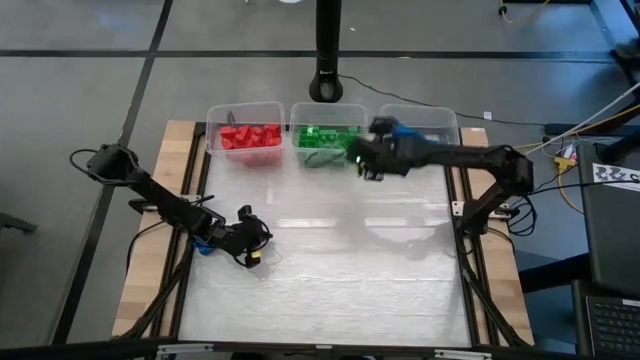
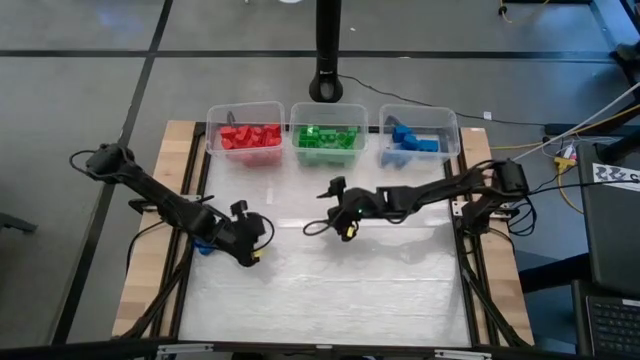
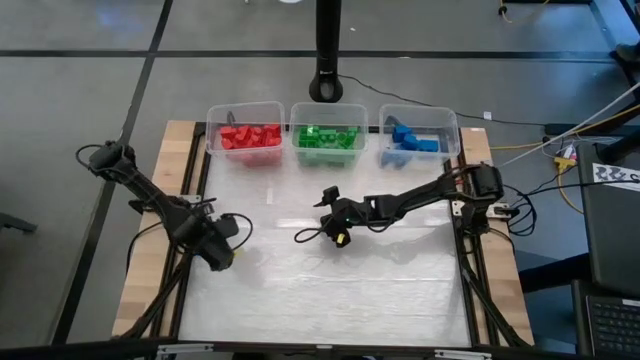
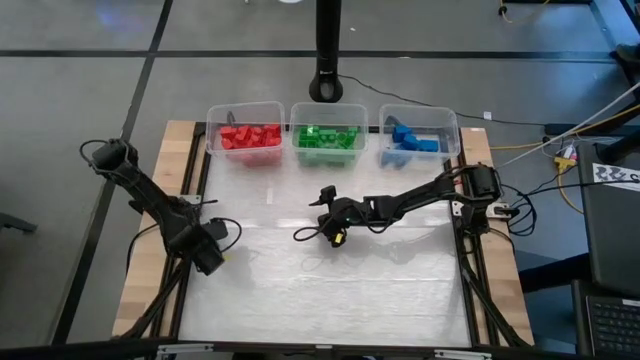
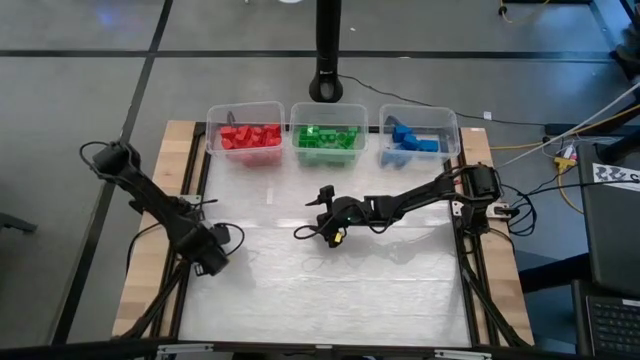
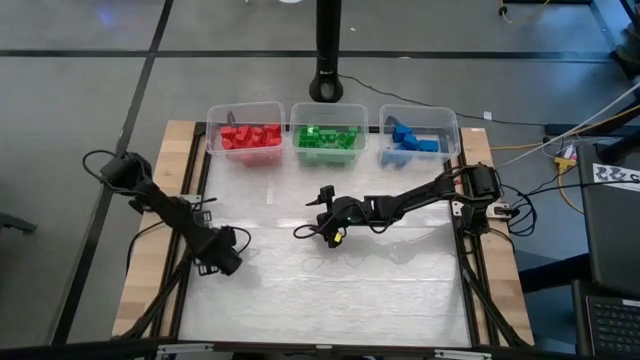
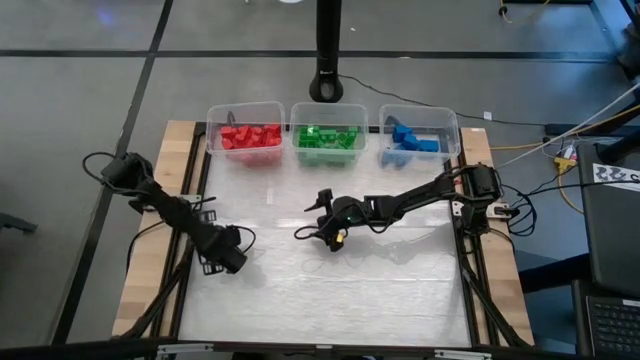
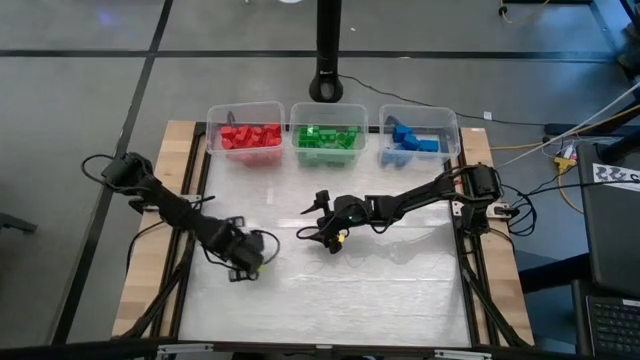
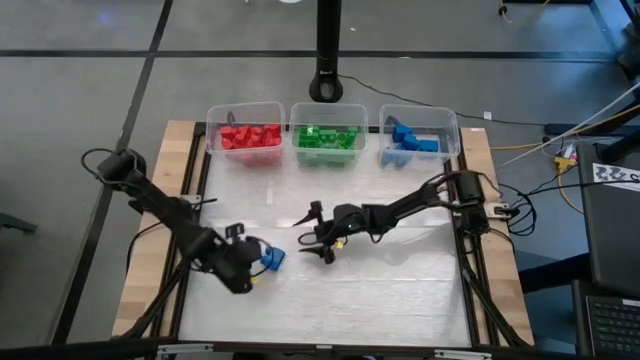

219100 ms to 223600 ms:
Task: Sort blocks
Prepare the blue game piece on the table

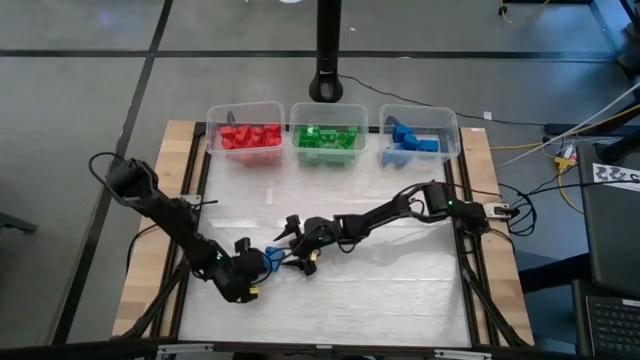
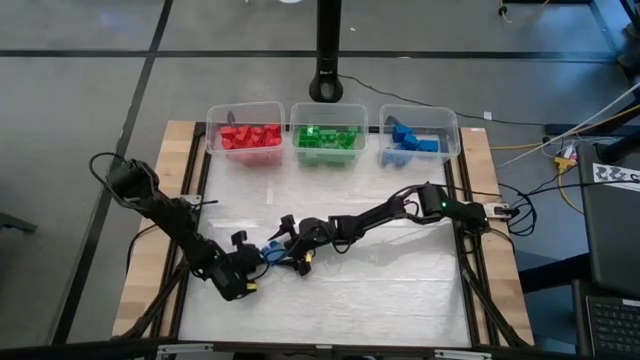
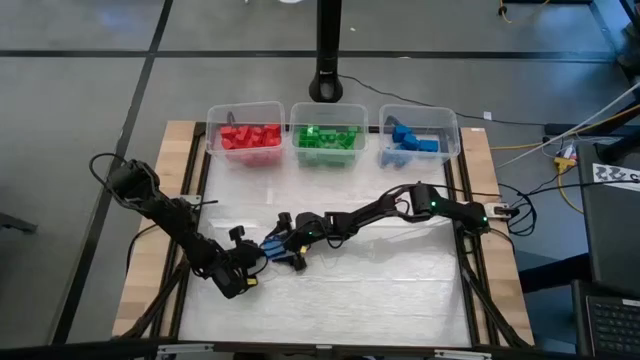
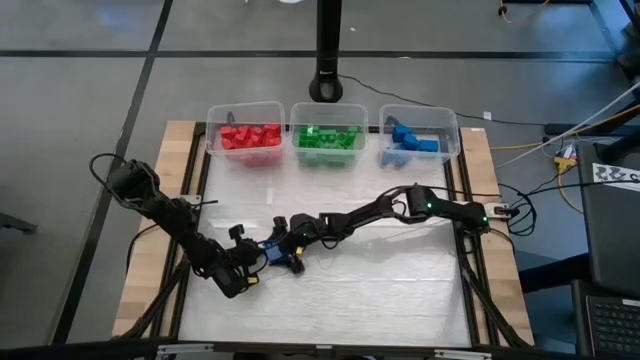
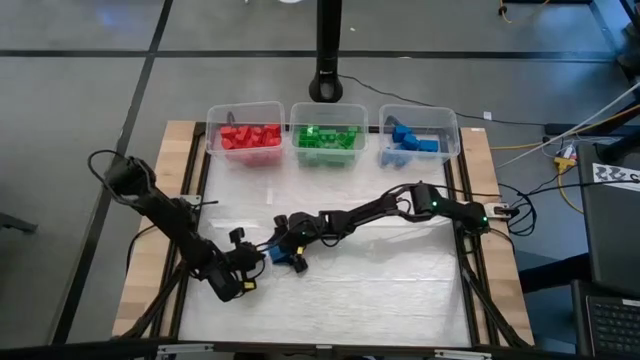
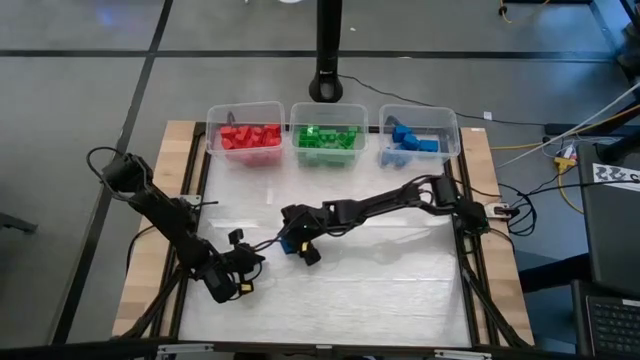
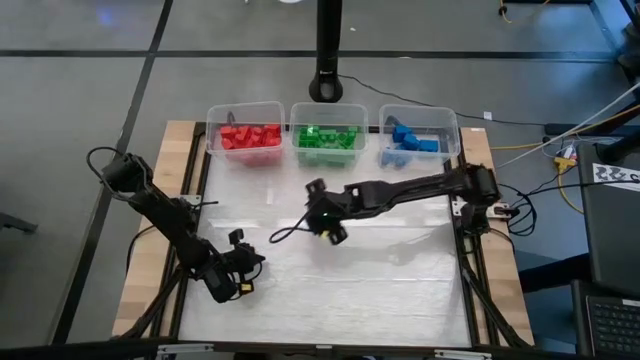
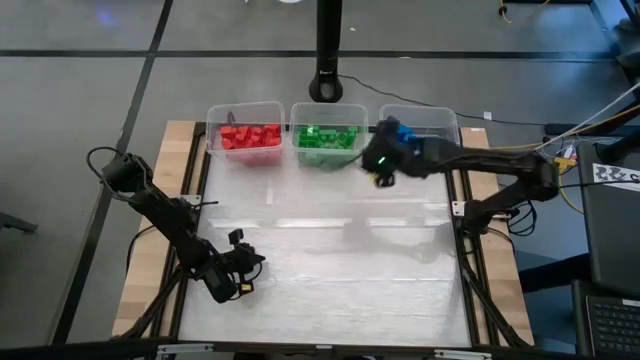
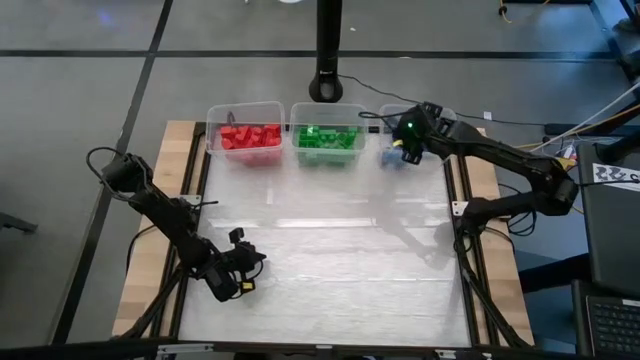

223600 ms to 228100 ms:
Put the blue game piece into the right transparent bin

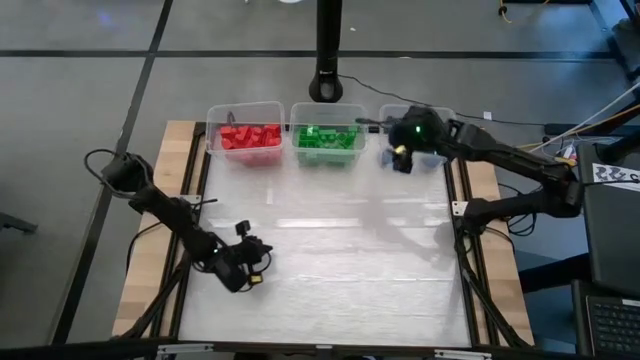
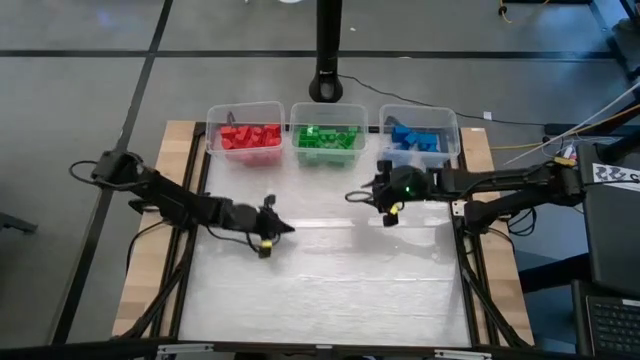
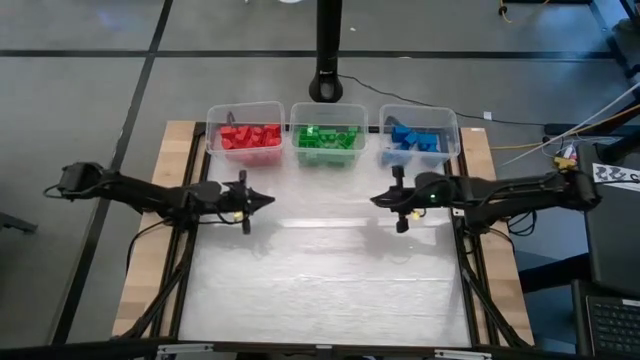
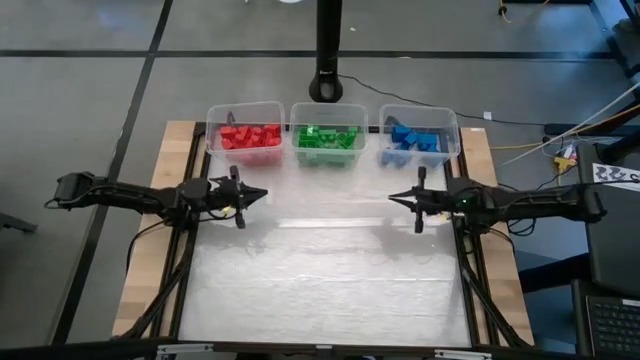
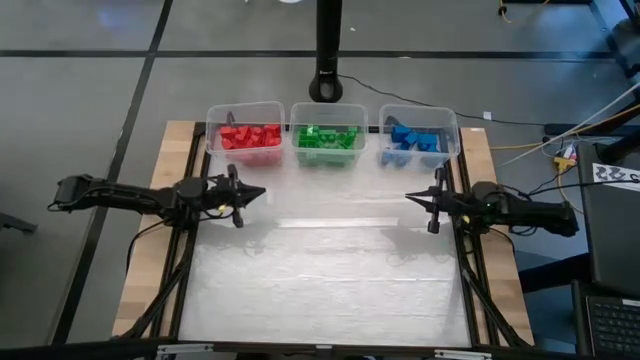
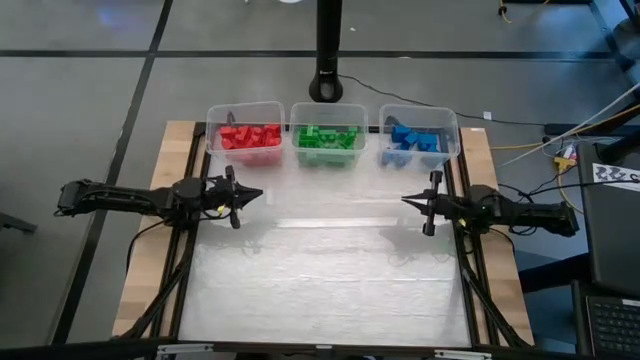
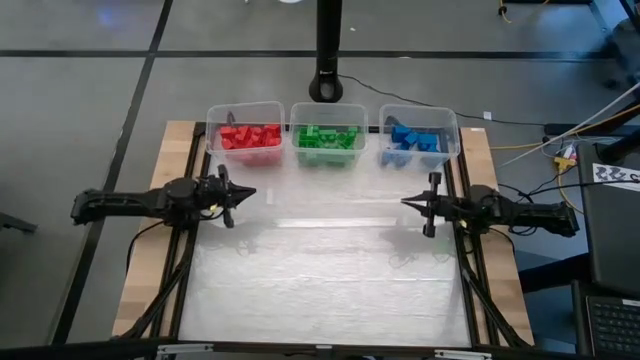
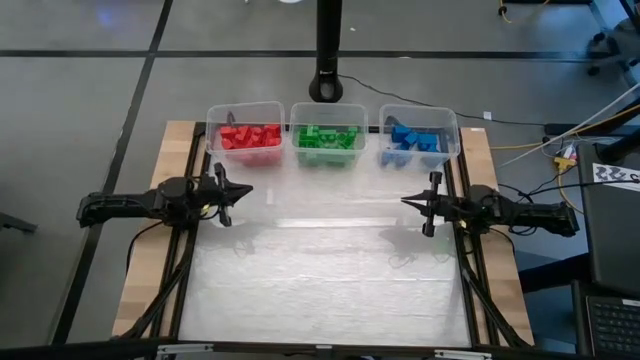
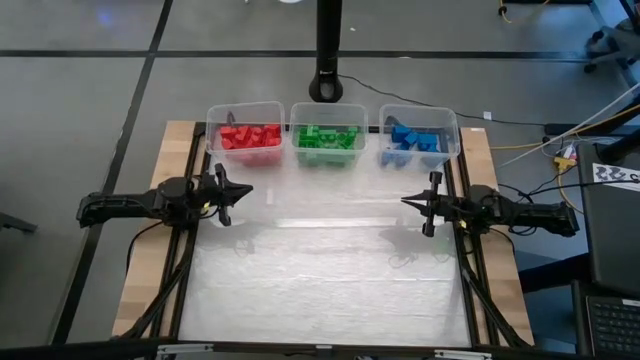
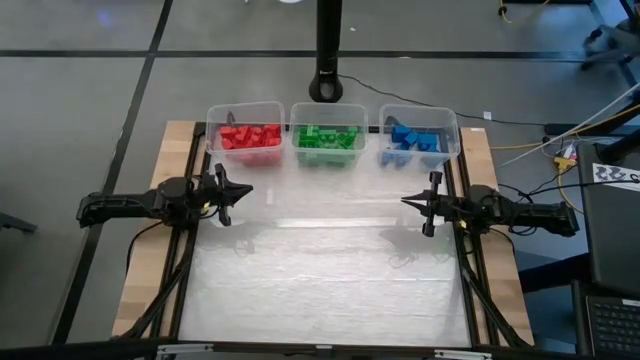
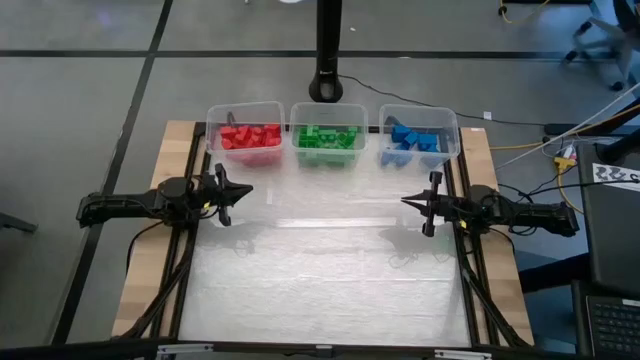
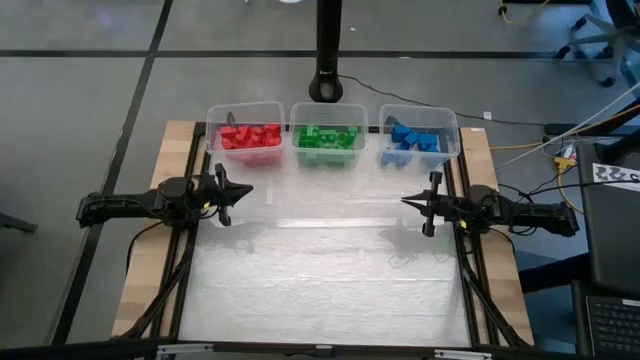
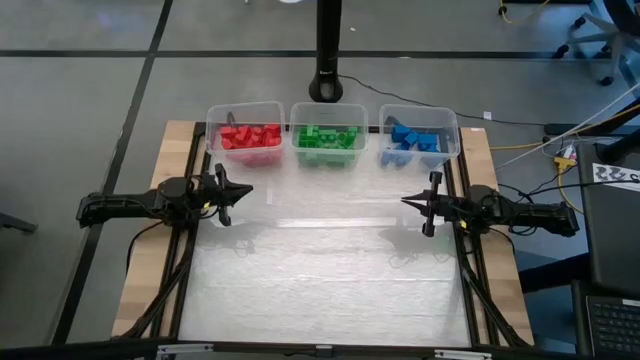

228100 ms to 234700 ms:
Return to Home Position

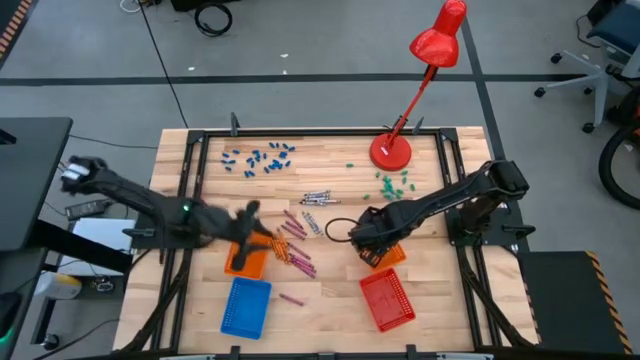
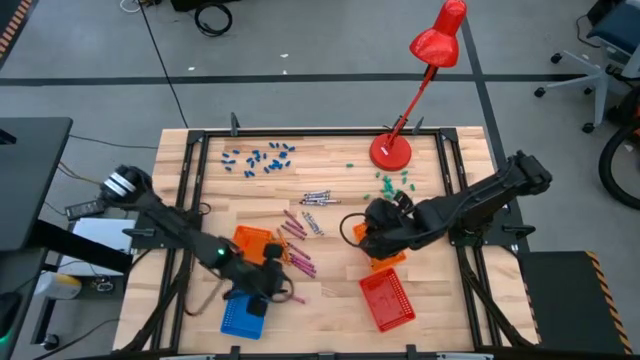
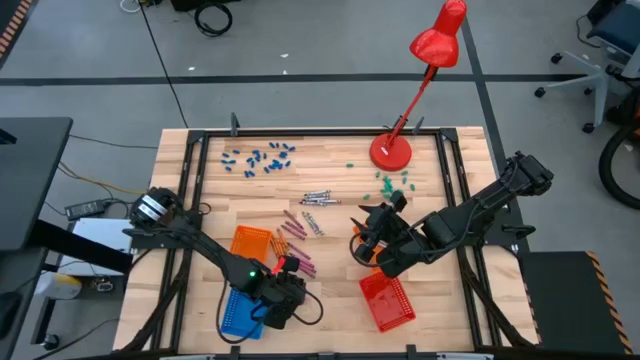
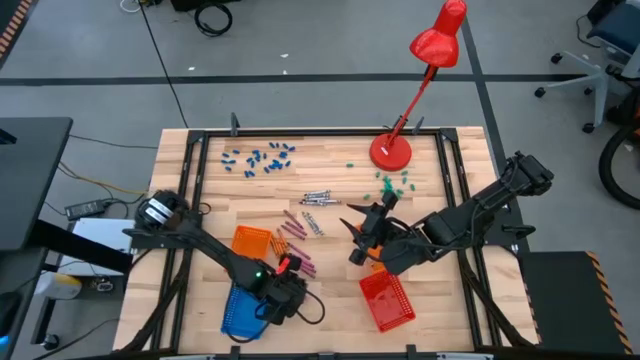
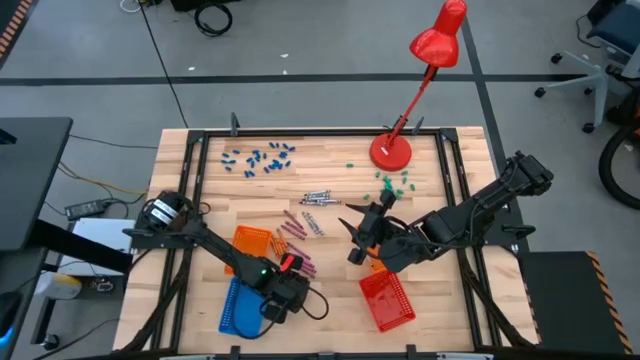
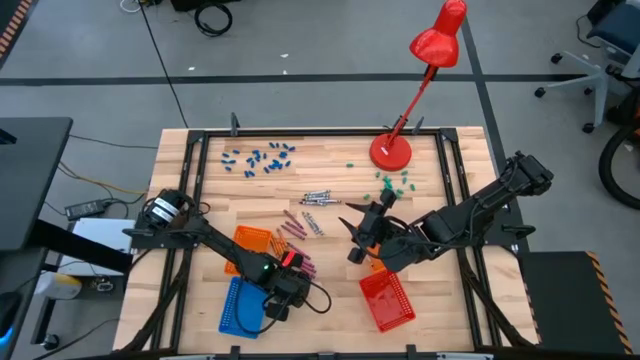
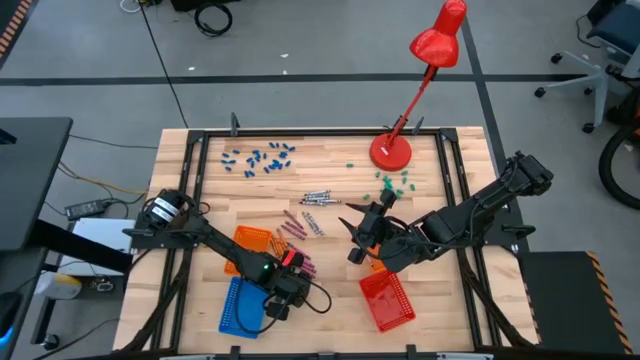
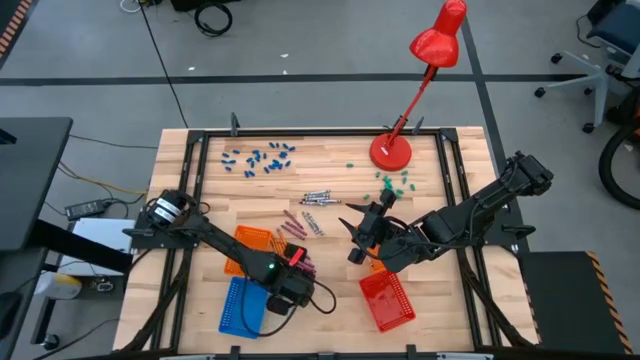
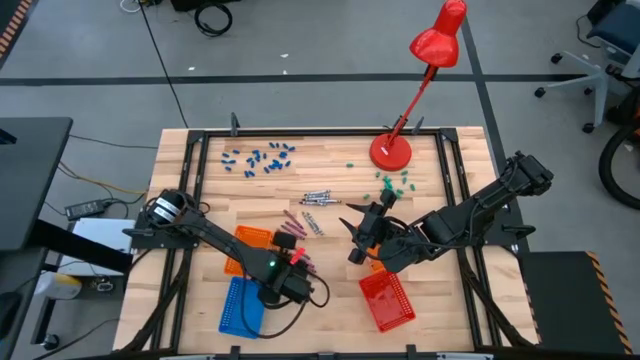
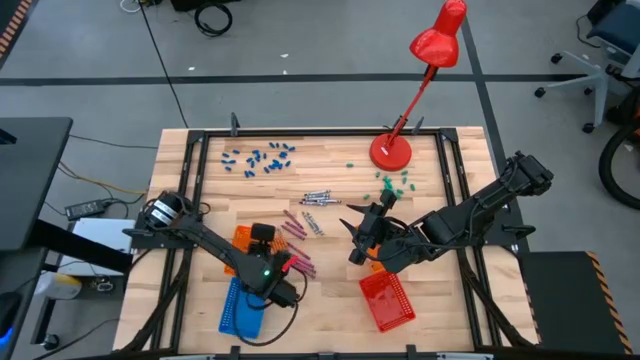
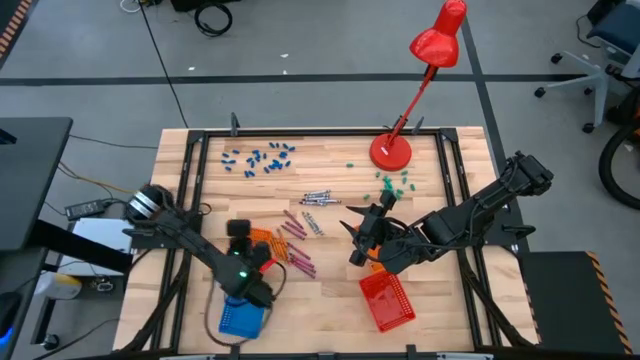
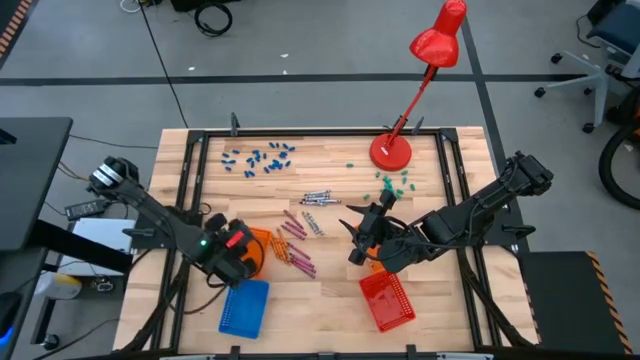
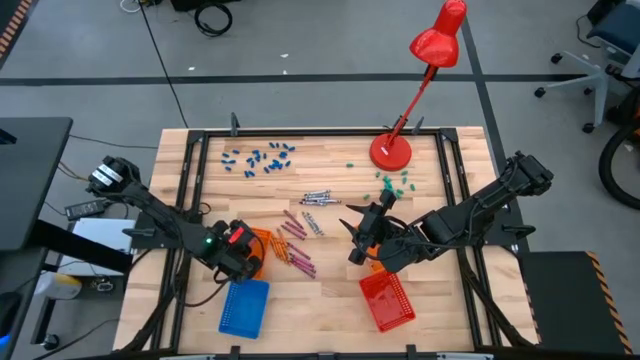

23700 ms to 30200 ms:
Task: Sort crayons
Put the red crayon into the left orange bin
